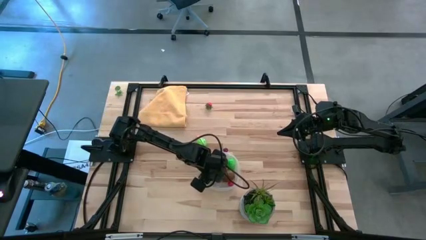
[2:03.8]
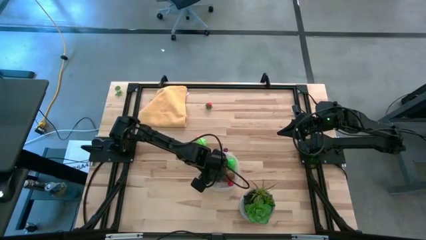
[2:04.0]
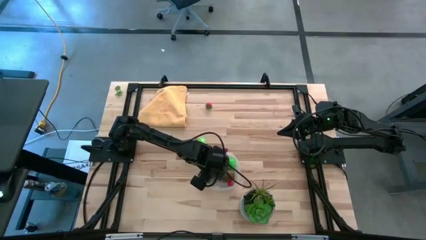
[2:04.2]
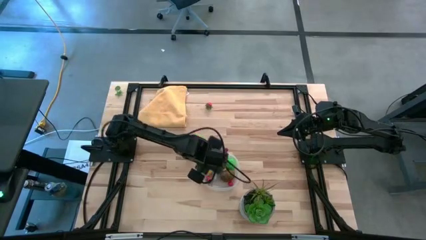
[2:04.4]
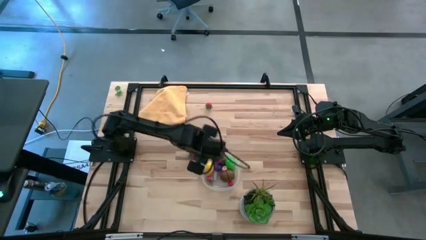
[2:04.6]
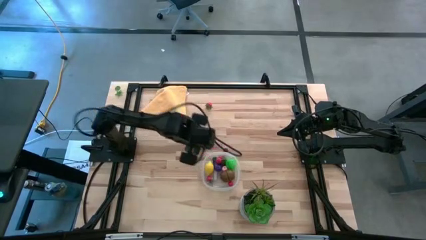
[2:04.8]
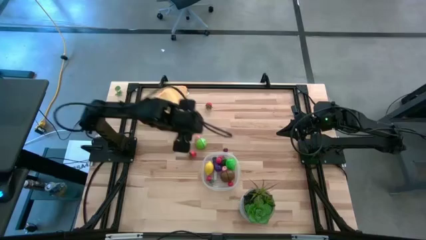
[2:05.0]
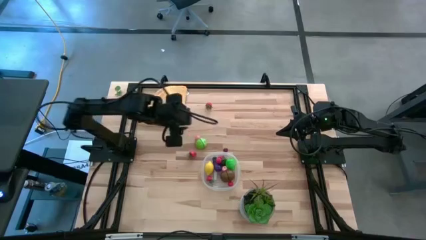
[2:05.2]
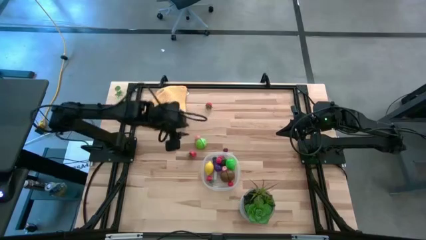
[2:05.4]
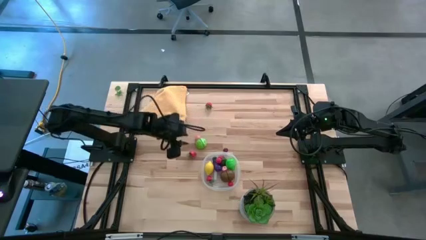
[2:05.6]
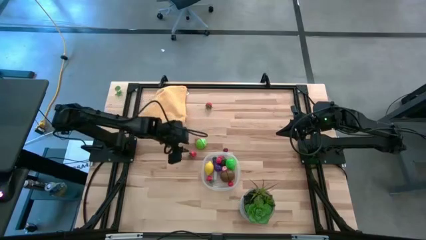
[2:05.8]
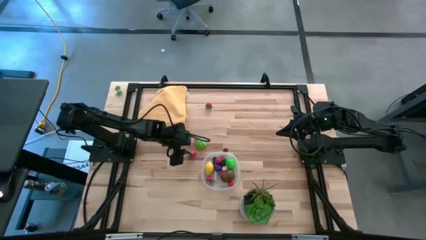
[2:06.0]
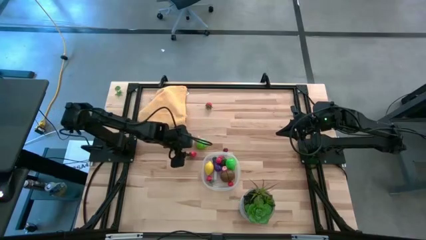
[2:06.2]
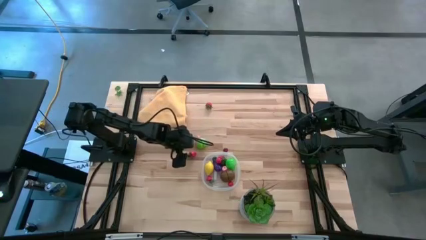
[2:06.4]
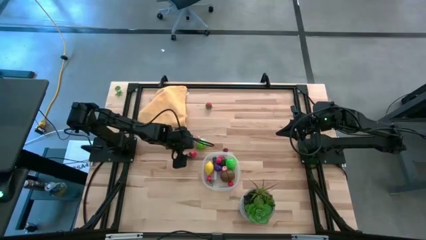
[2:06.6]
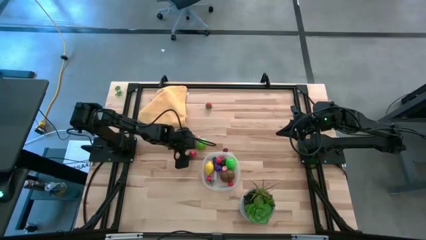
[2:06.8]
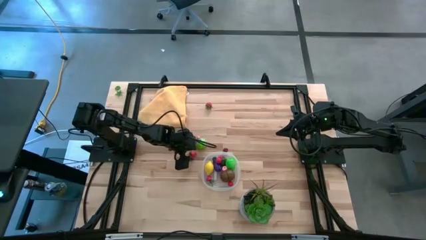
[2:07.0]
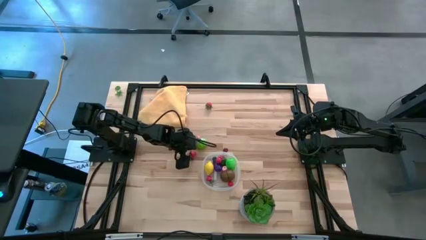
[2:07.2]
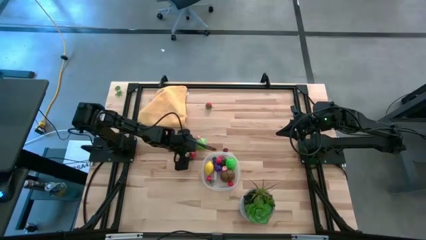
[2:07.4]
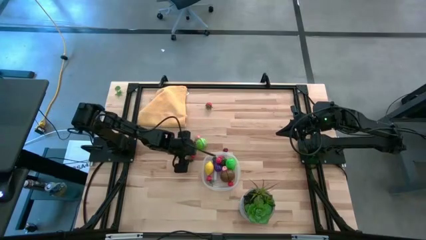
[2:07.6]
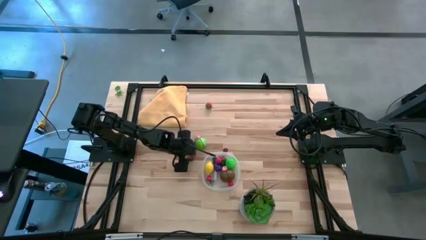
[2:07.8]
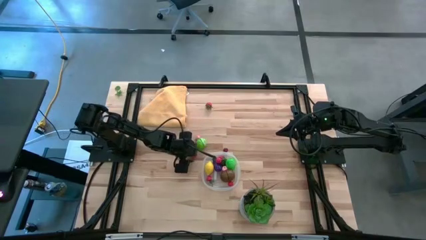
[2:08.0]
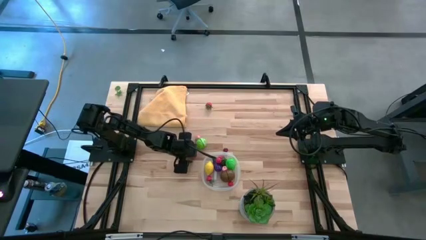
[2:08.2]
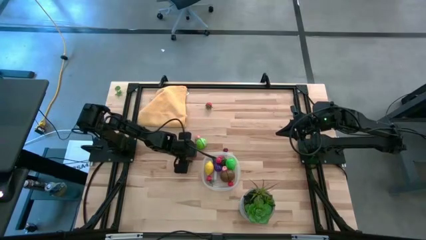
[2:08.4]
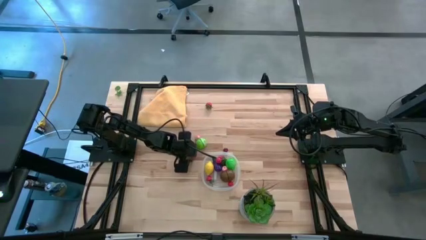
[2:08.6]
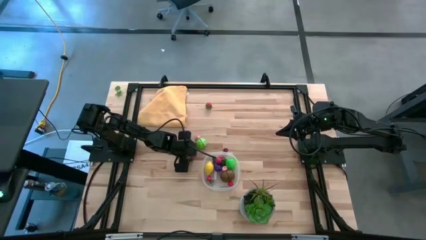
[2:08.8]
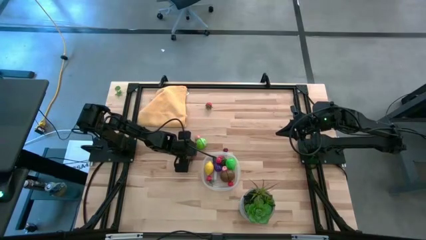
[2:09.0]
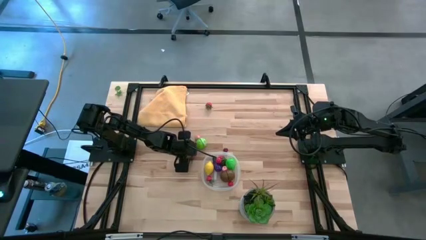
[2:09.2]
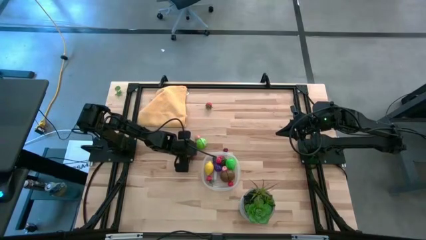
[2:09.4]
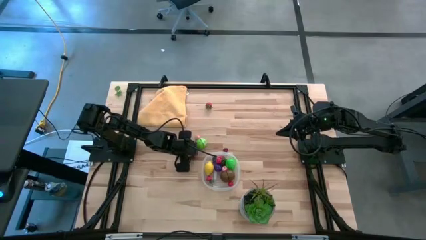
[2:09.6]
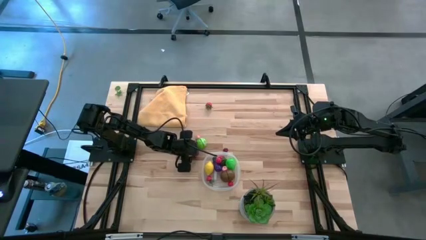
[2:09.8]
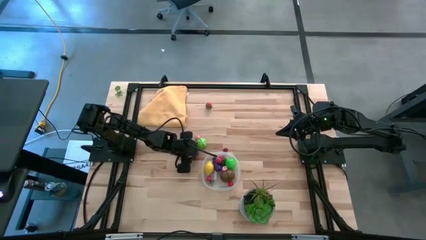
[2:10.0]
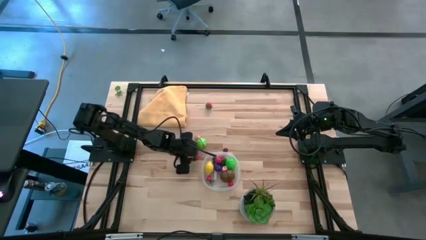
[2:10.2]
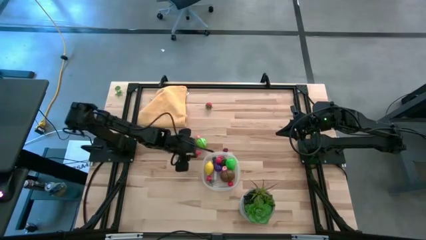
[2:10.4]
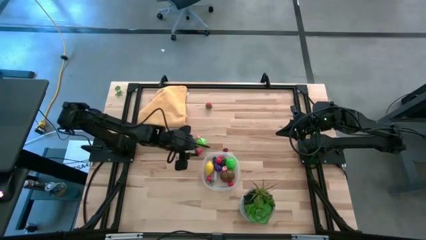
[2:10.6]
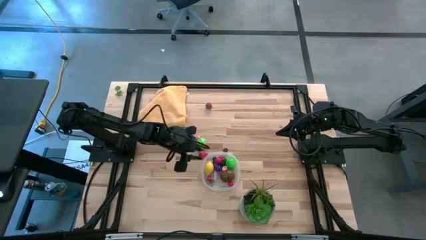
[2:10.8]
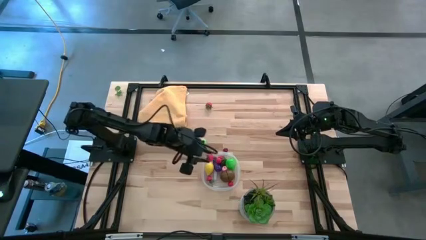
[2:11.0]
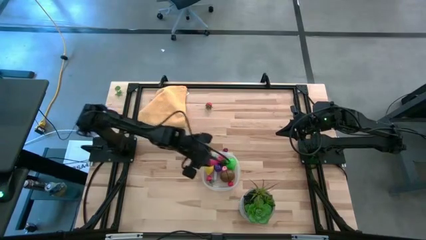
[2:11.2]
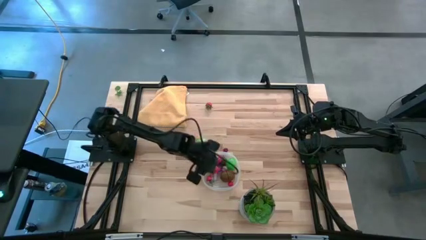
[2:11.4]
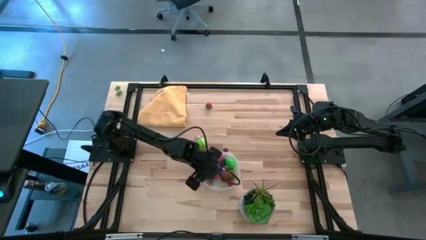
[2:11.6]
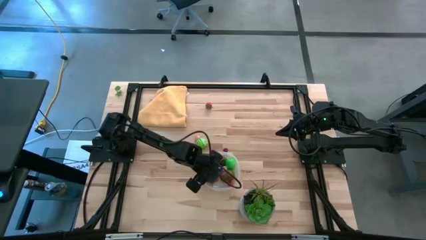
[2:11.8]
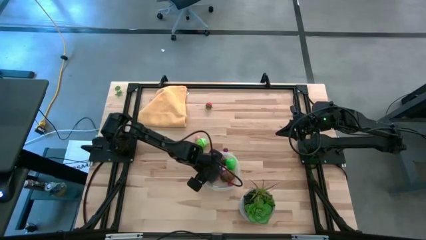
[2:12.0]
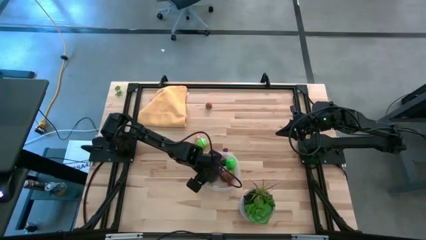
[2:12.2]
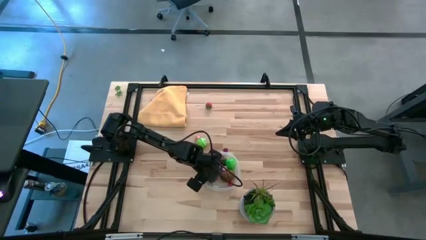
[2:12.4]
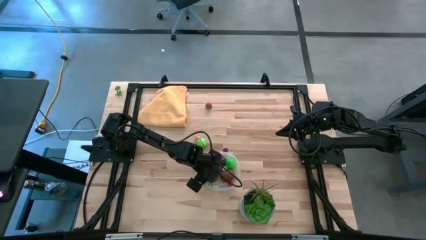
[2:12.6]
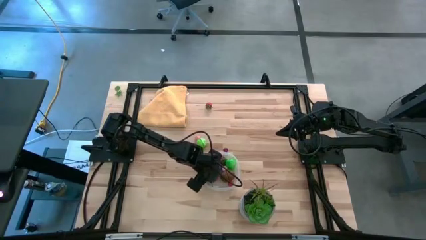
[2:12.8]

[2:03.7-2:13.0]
Task: Pick and placing Produce into tupperware
Put the red strawberry into the transparent bin

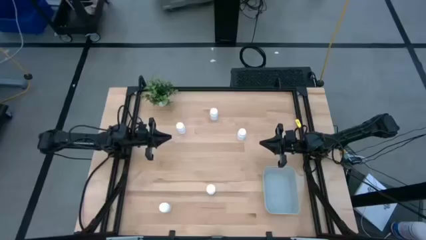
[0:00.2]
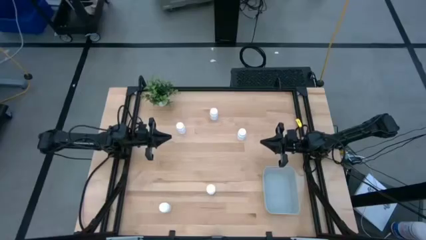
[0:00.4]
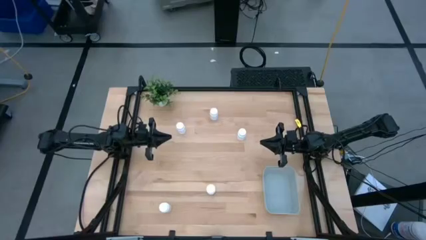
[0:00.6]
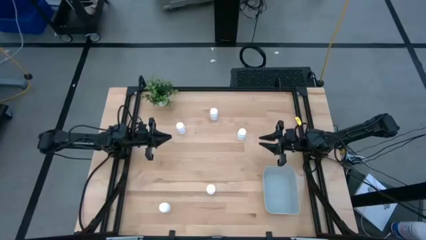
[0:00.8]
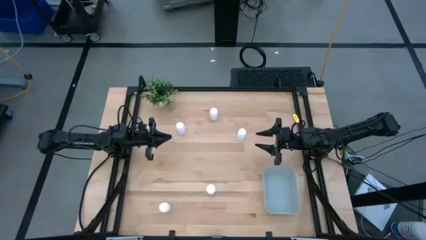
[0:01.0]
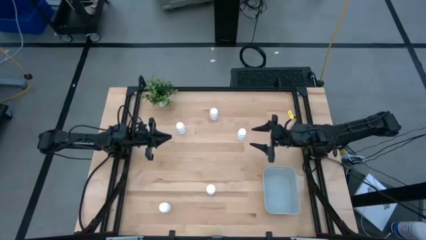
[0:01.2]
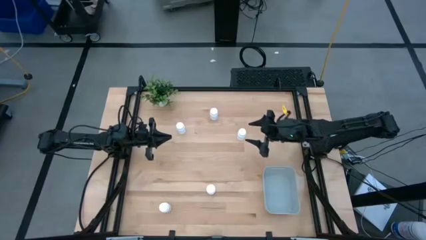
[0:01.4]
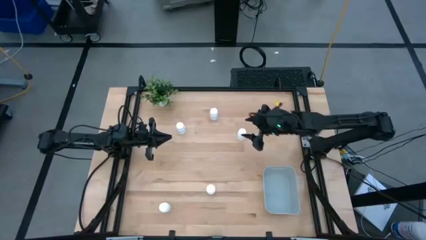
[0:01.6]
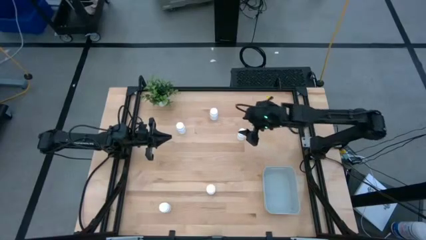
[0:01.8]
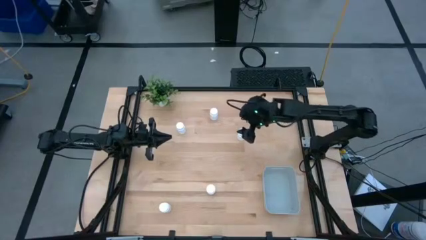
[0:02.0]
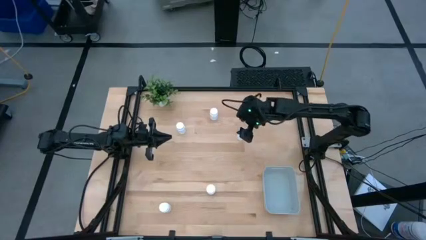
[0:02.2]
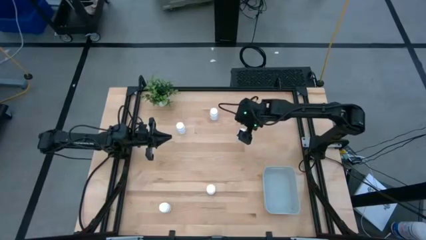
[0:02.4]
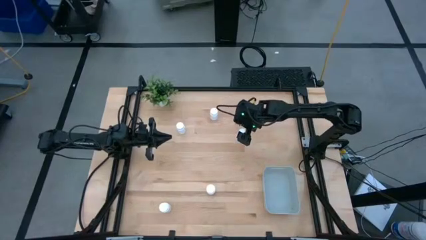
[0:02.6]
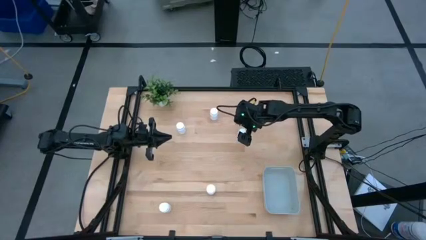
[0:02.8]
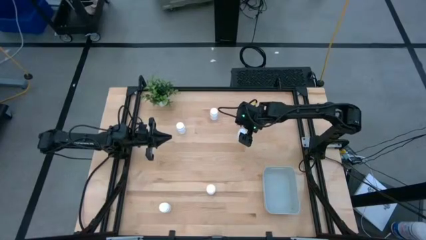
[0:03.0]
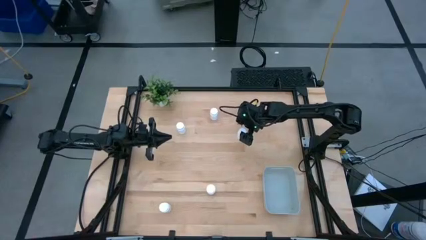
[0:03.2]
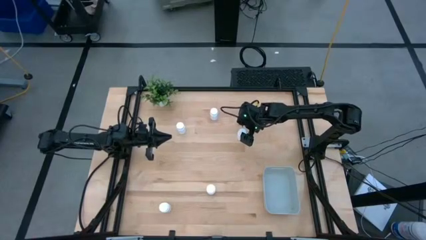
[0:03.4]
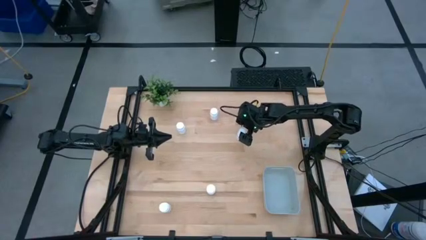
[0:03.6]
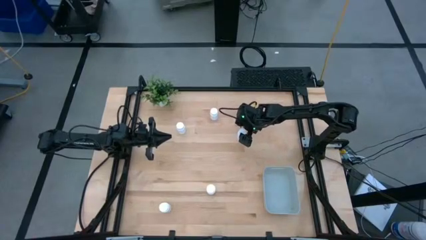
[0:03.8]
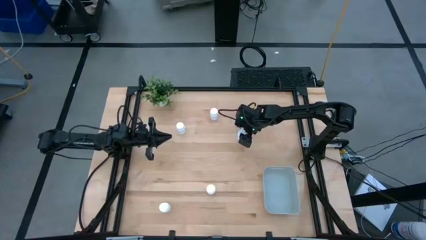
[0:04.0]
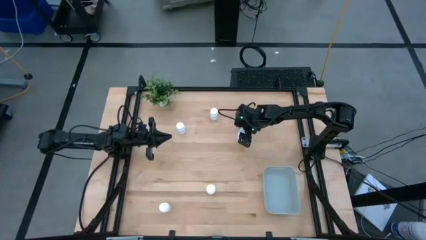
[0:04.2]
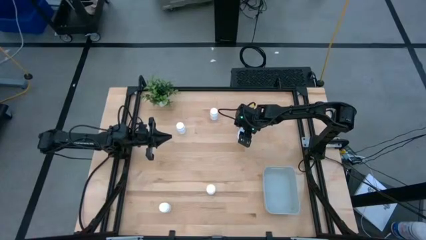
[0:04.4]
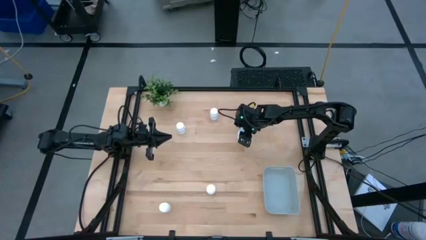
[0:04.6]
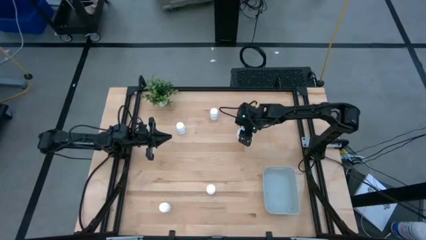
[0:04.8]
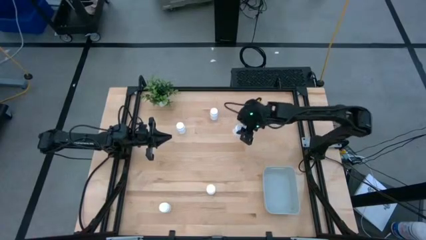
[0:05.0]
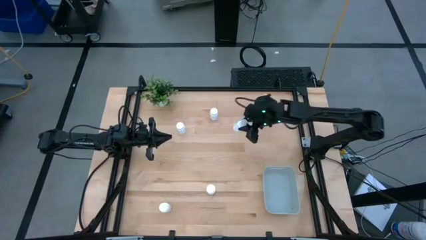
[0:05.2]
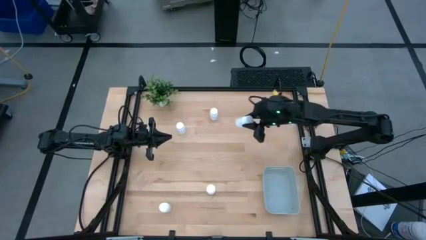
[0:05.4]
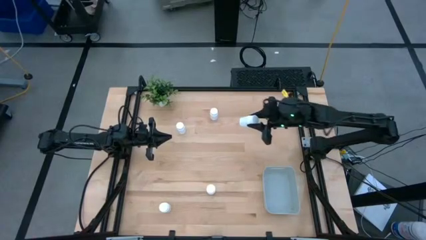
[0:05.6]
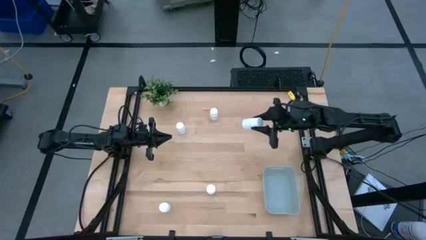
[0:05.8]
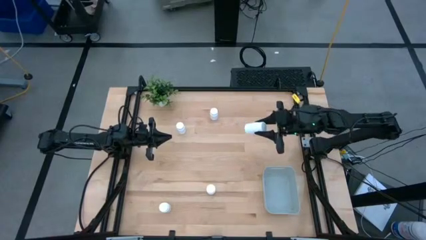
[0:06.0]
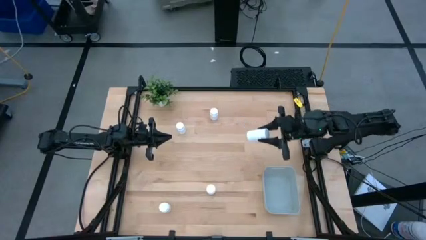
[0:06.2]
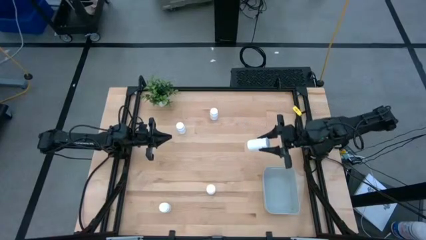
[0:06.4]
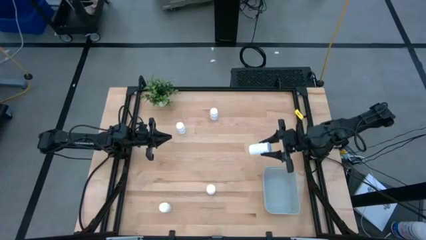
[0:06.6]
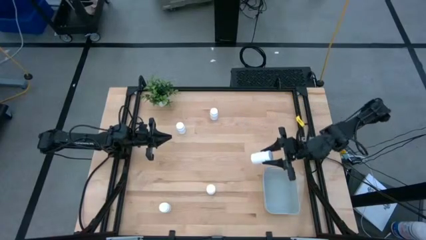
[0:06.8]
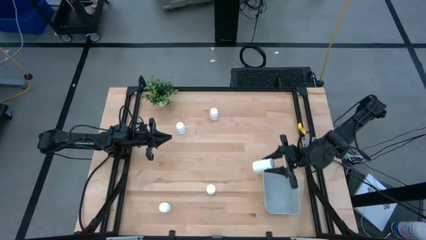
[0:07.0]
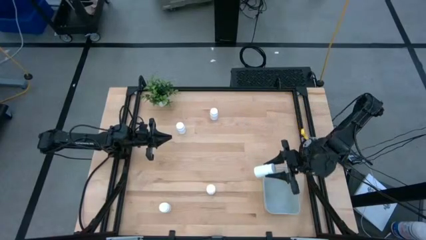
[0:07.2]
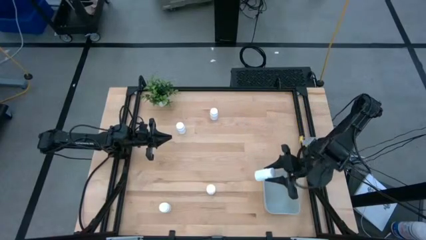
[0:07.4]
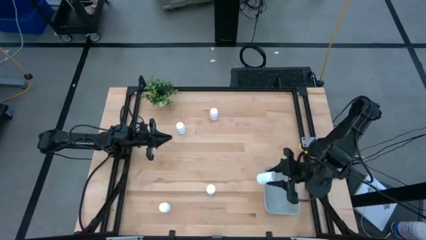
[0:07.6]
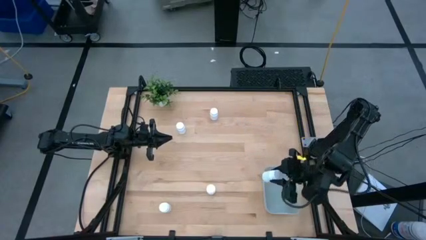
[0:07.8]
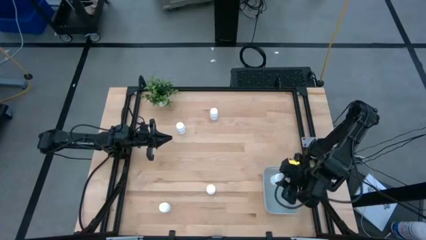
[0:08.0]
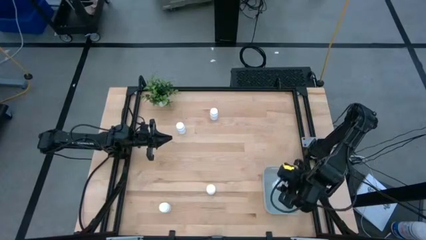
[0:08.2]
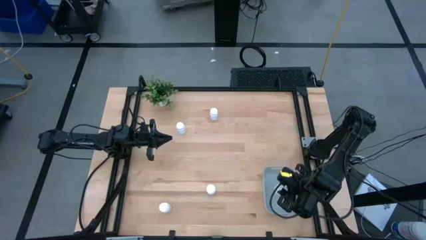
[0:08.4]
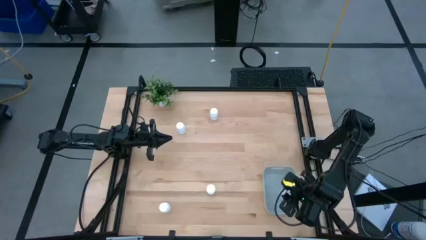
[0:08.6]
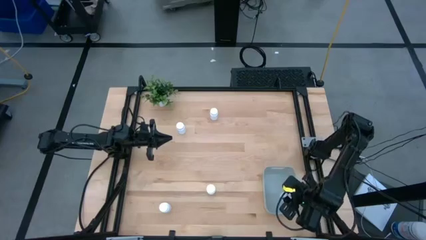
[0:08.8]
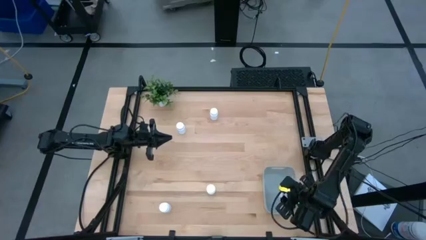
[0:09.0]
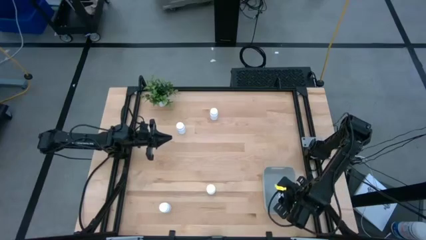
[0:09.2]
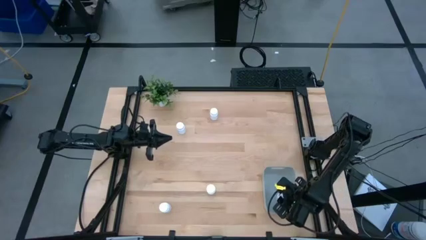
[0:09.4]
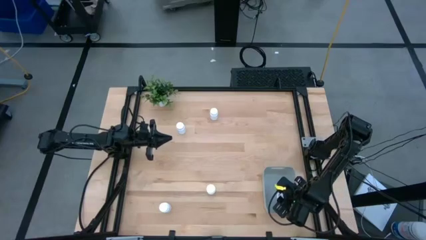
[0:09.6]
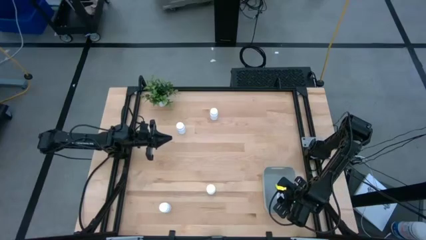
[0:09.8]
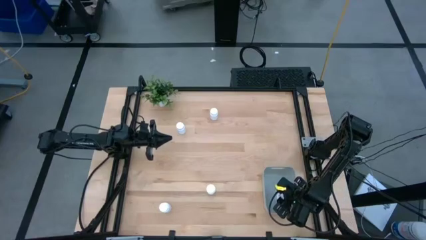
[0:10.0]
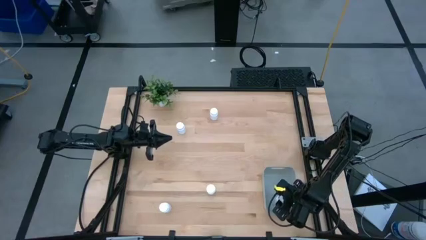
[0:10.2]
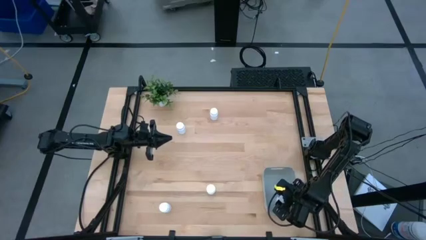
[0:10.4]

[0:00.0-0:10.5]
Task: Pick and place pill bottles into a basket
Put the white pill bottle into the gray bin
